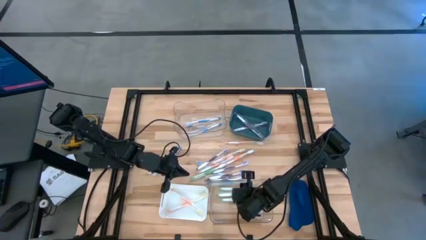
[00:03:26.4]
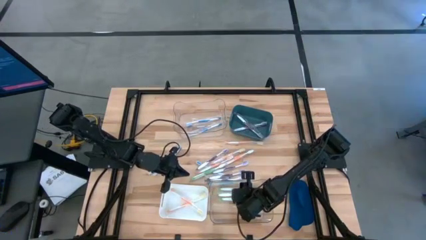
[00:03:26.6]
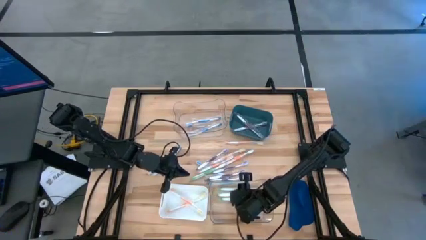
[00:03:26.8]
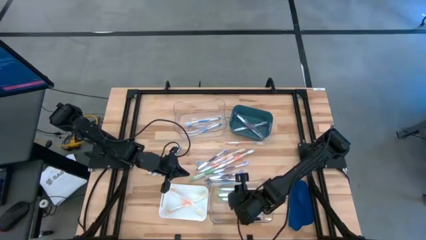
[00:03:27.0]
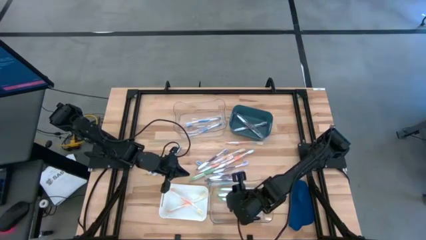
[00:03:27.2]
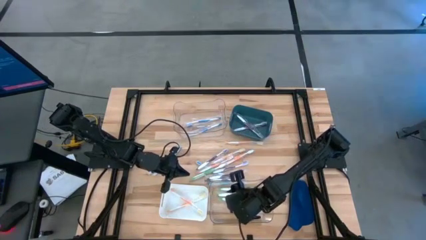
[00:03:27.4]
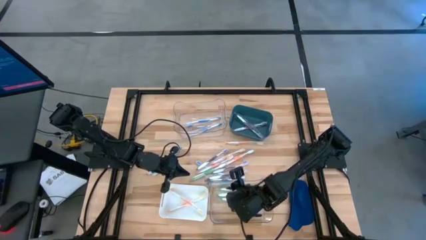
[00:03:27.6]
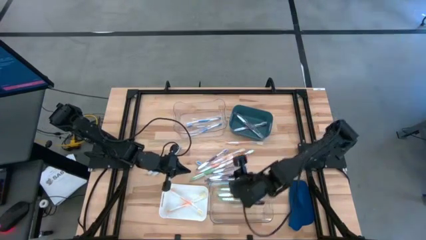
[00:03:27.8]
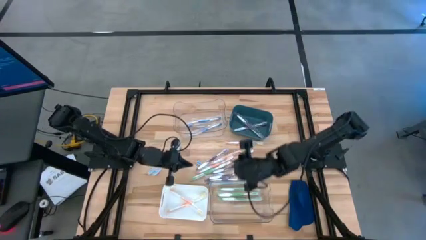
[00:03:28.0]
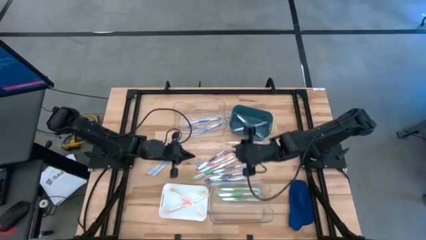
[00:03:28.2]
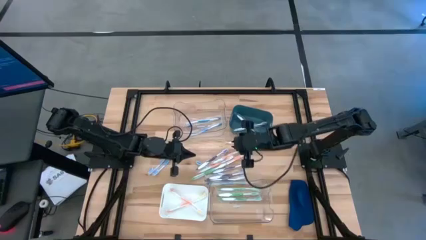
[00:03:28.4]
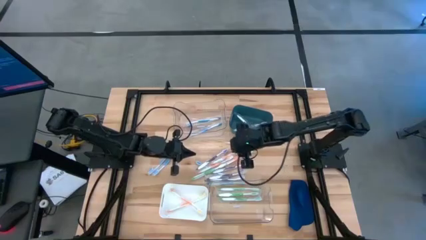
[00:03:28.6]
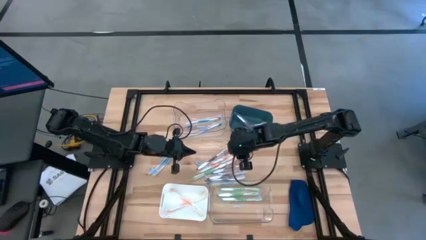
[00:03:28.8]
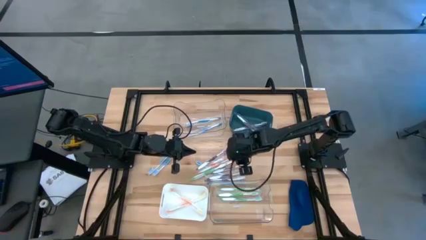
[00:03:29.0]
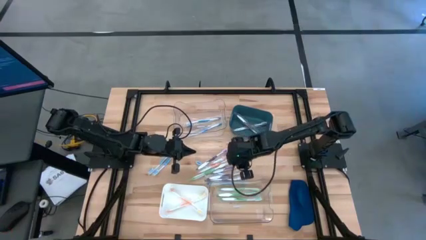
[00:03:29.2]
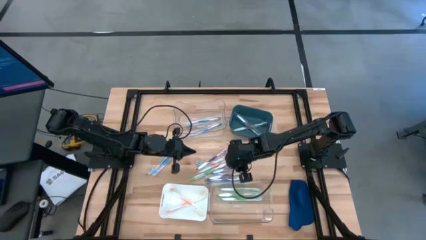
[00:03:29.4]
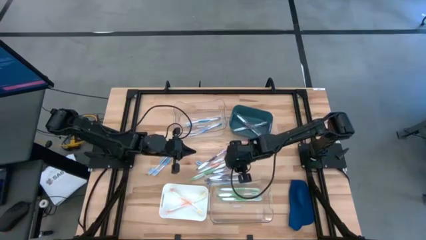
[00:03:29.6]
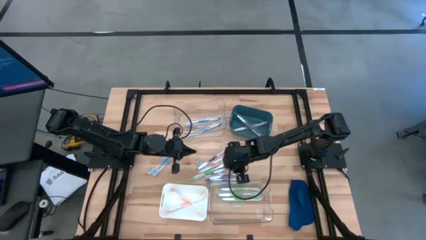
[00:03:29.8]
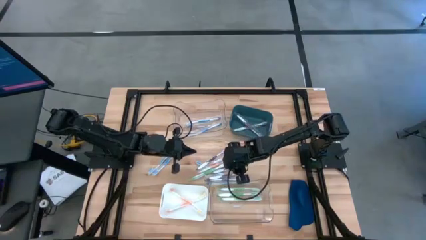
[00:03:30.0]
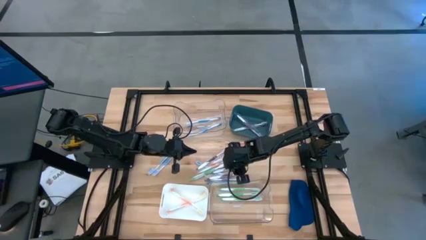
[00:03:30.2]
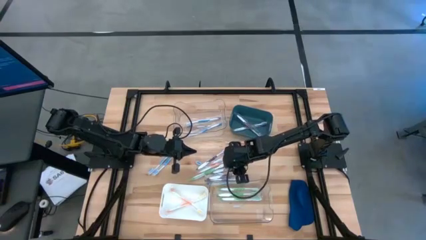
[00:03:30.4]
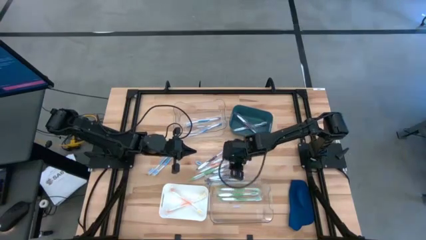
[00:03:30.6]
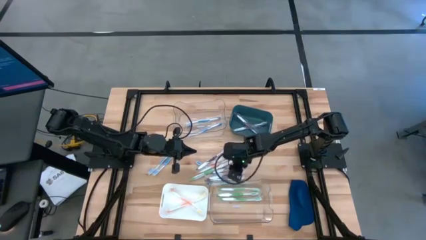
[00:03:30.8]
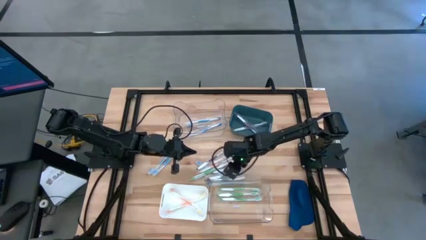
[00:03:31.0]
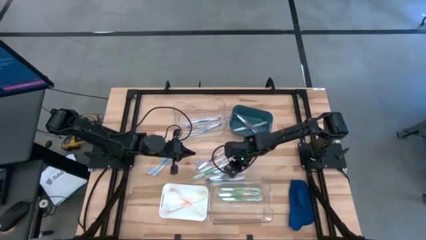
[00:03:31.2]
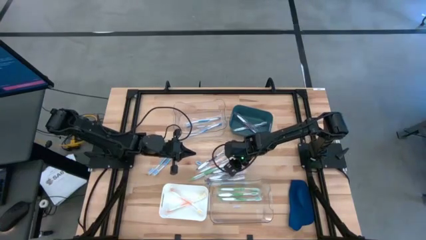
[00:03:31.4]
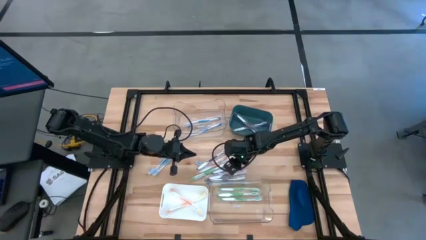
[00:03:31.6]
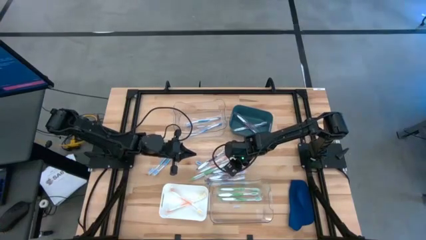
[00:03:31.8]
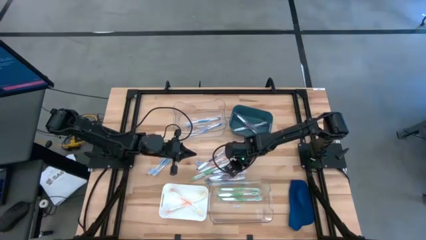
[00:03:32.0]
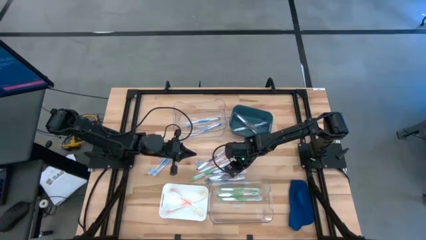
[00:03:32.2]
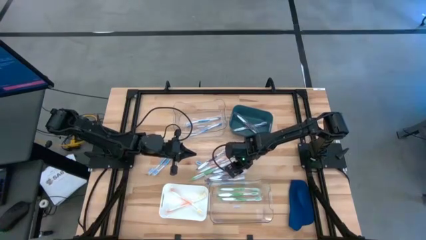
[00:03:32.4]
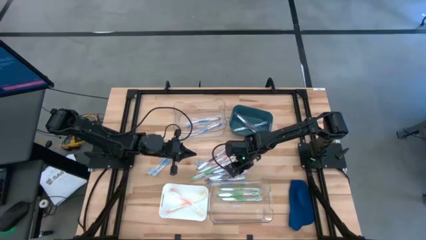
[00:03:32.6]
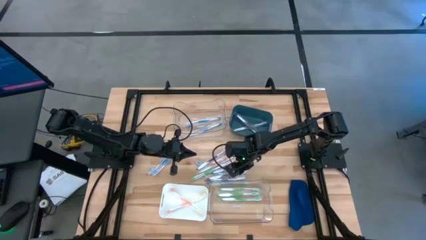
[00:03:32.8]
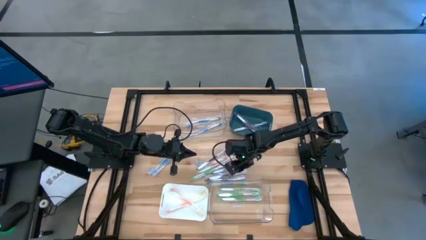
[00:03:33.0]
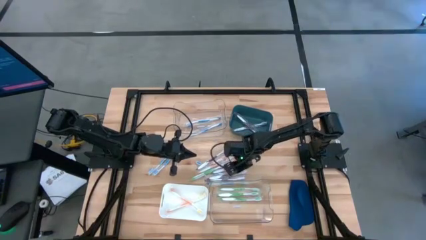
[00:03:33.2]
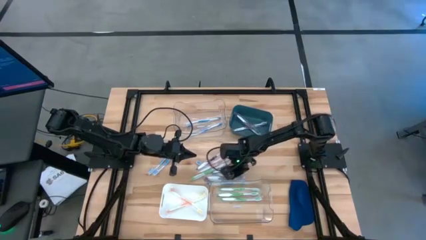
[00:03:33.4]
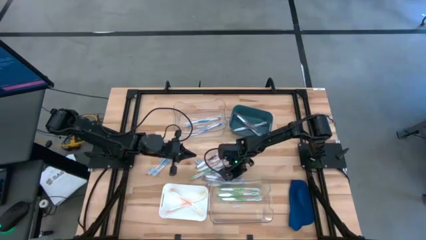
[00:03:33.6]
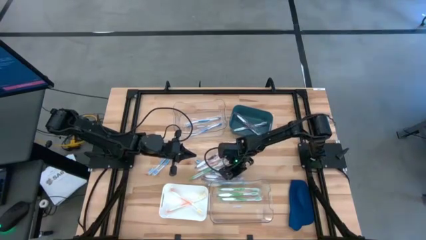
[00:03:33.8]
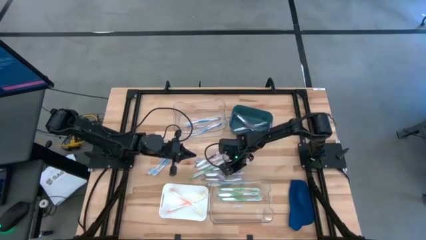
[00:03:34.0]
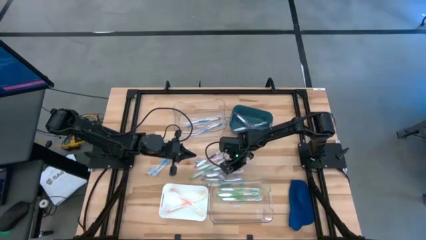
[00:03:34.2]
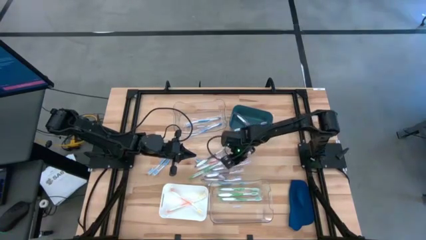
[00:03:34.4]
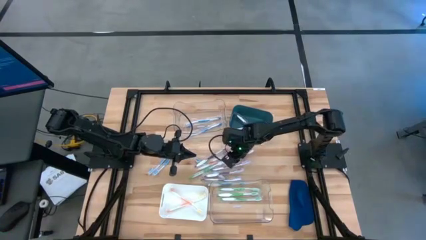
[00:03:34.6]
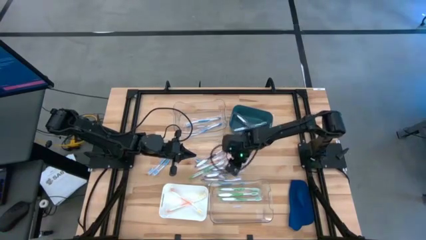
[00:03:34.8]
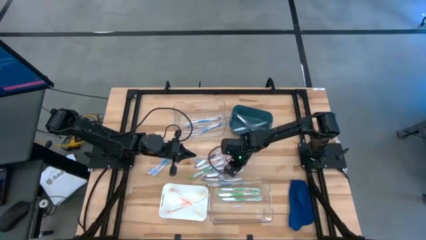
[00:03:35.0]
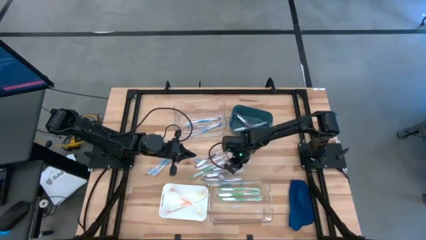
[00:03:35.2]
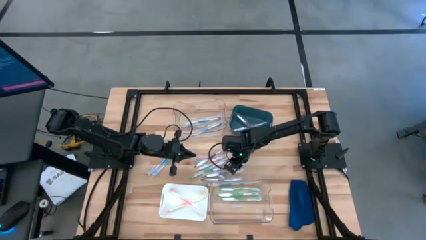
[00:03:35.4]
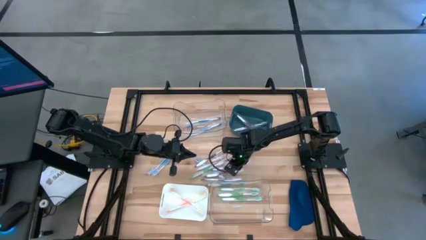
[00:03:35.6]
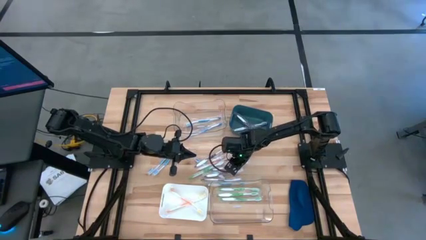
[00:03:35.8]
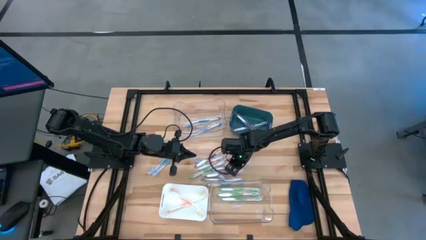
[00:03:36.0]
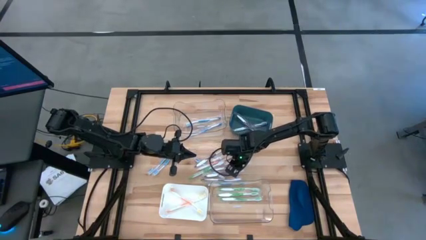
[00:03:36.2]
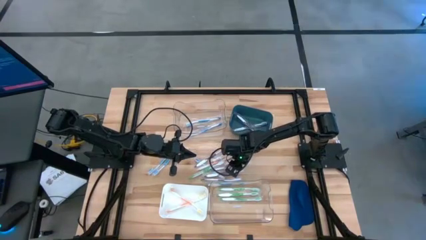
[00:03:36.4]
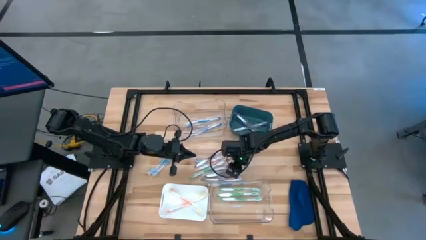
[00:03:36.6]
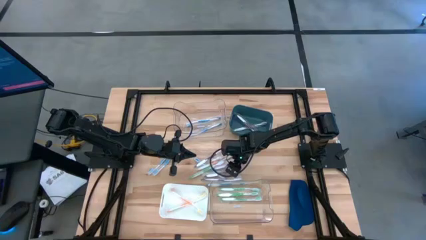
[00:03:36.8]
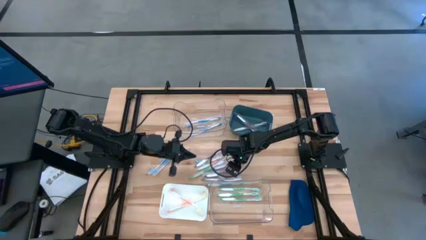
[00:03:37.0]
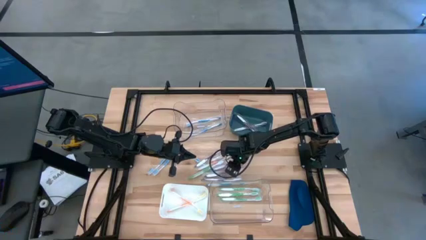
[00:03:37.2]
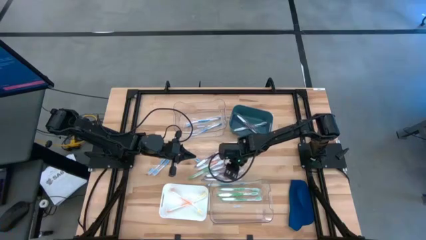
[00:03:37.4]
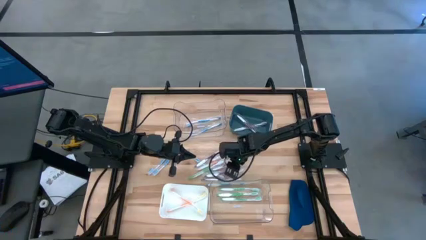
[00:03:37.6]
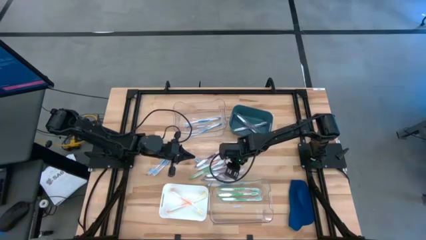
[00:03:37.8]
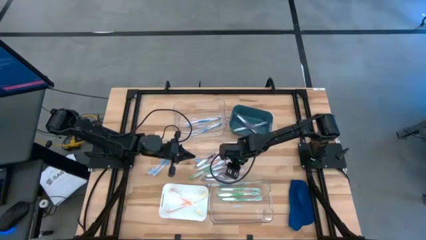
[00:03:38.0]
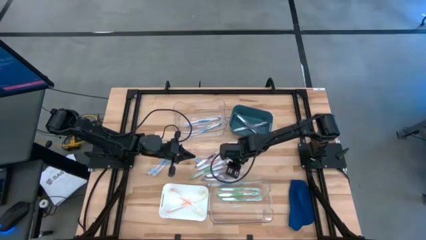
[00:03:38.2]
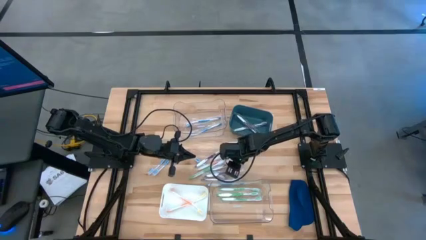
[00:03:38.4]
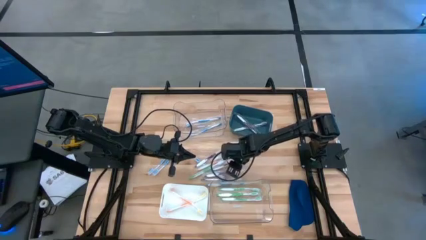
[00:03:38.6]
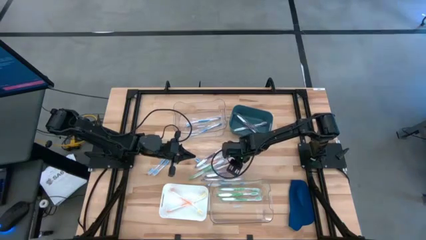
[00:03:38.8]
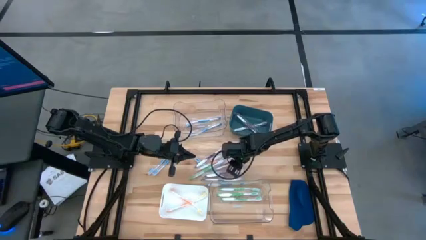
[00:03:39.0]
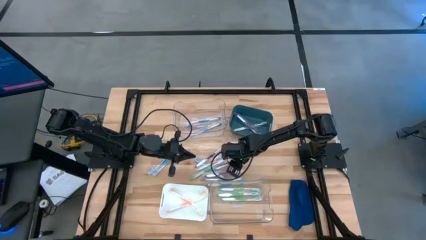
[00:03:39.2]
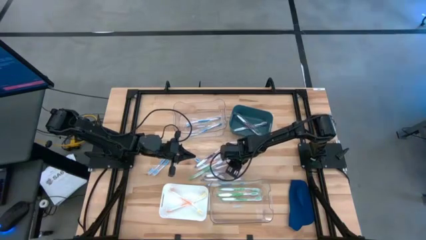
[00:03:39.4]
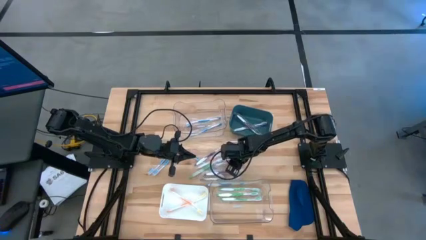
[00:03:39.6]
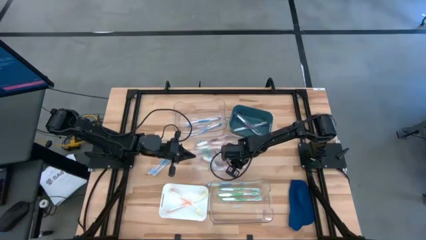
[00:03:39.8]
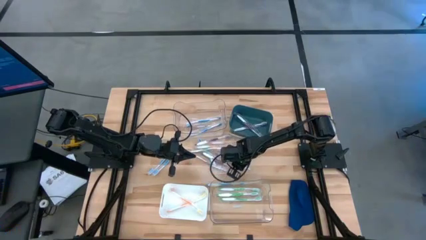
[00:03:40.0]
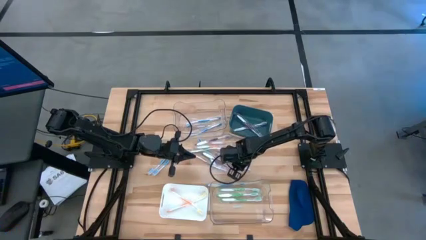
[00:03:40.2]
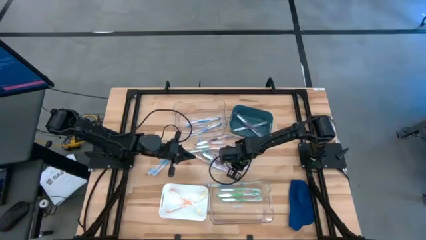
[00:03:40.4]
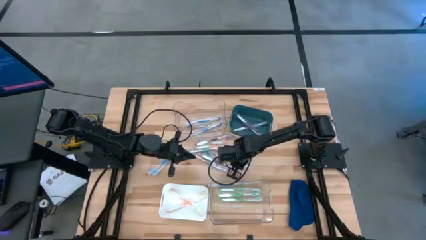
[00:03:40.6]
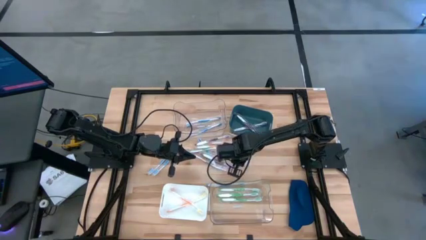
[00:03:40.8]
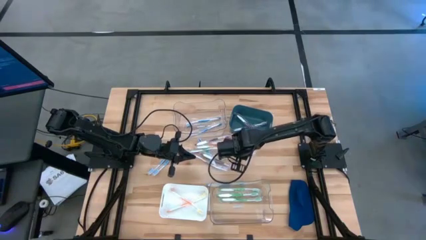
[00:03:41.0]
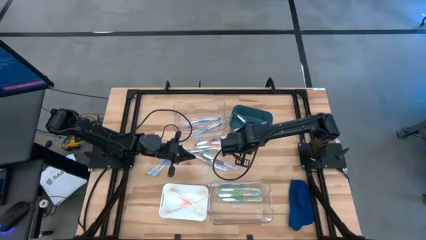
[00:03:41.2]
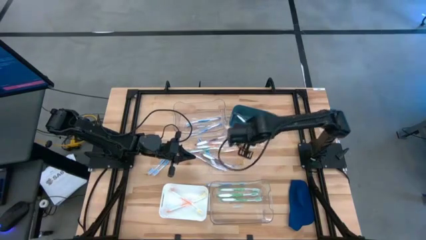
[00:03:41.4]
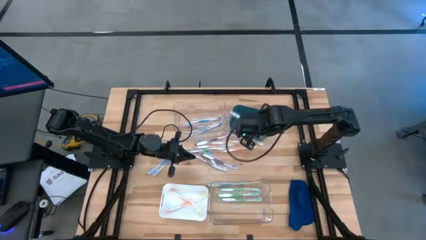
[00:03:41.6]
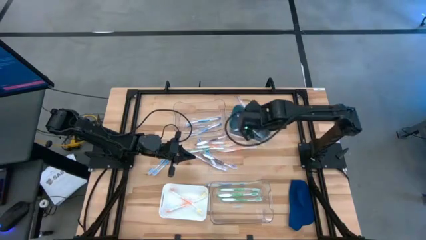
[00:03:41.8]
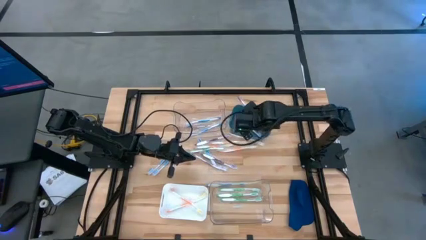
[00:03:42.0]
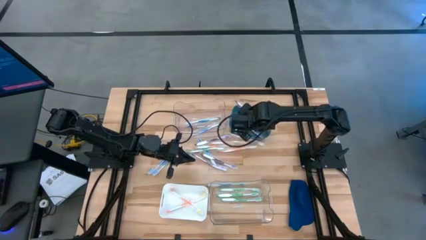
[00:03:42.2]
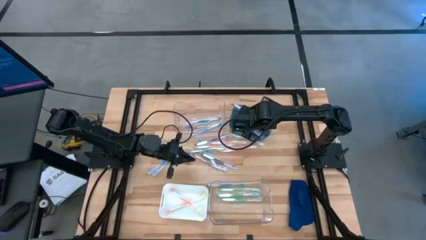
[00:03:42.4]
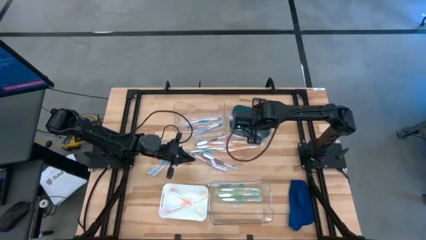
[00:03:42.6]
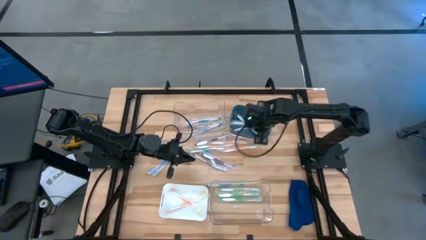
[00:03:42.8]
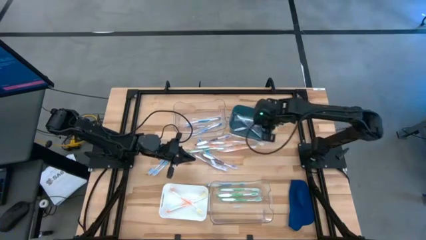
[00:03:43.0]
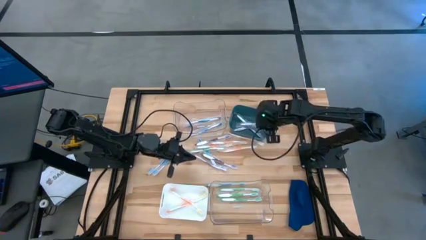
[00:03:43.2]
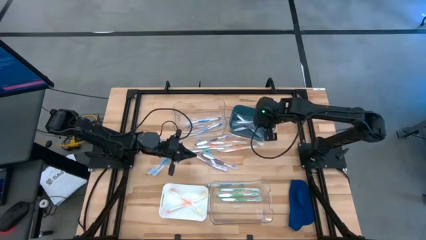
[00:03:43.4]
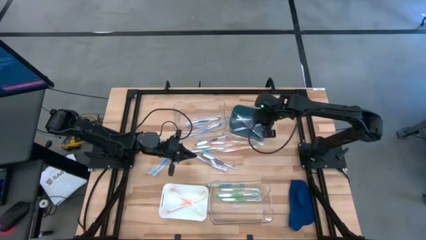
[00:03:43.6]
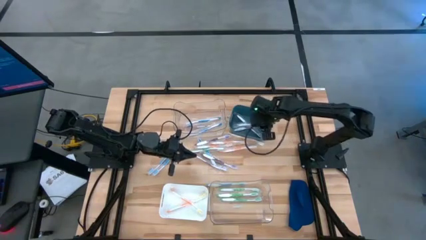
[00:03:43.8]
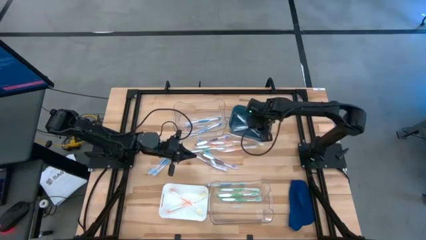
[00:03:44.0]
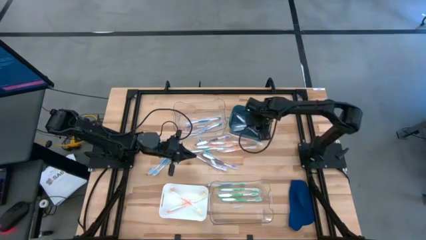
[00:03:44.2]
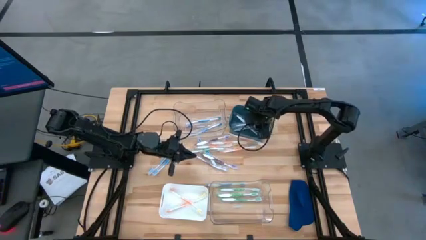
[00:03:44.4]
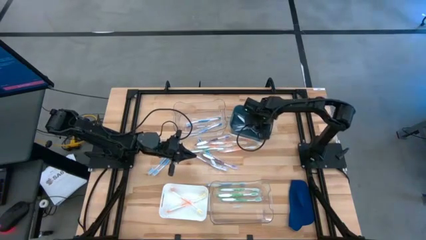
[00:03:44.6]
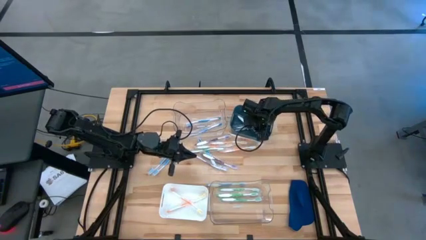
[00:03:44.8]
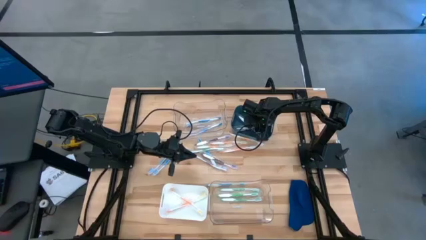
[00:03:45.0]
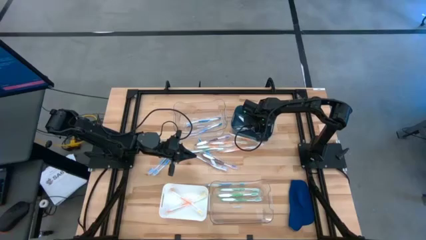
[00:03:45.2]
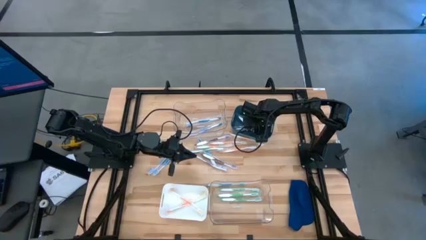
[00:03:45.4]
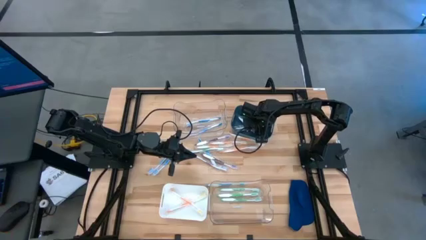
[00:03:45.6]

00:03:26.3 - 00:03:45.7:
Task: Pick & Place Toothbrushes
Put the purple toothbrush into the green bin
